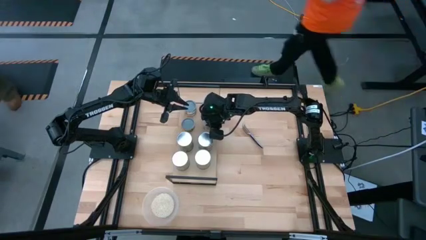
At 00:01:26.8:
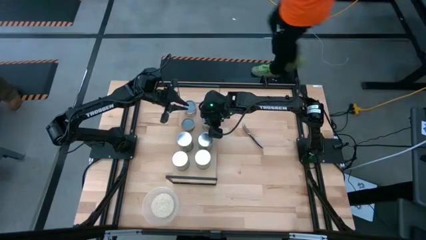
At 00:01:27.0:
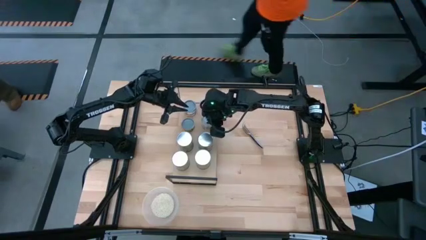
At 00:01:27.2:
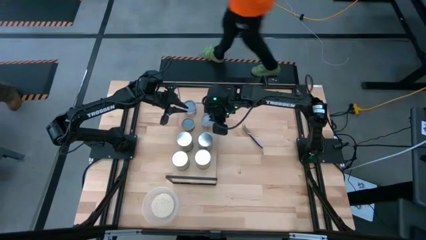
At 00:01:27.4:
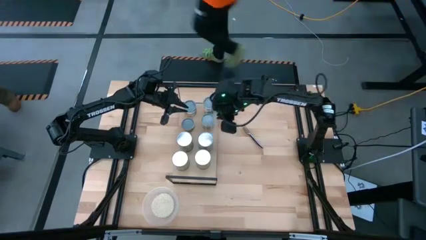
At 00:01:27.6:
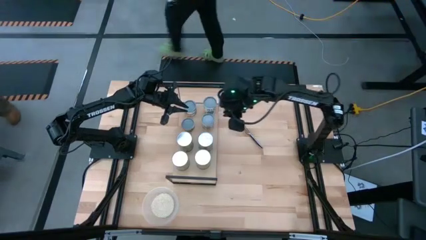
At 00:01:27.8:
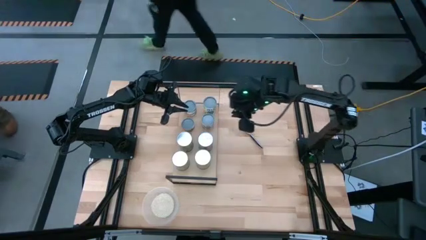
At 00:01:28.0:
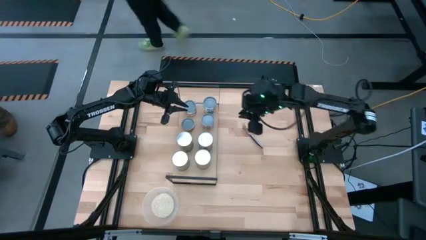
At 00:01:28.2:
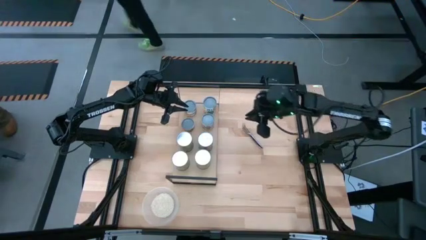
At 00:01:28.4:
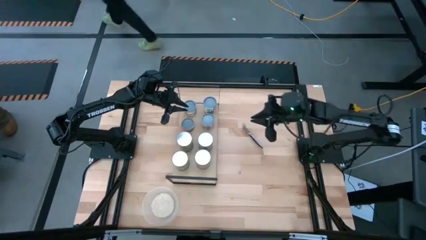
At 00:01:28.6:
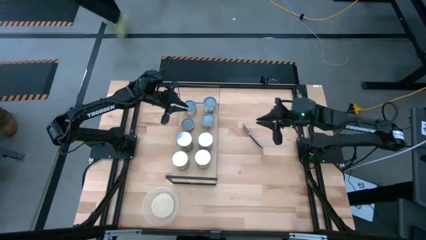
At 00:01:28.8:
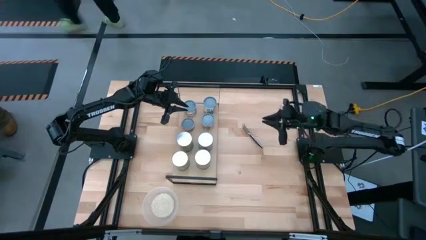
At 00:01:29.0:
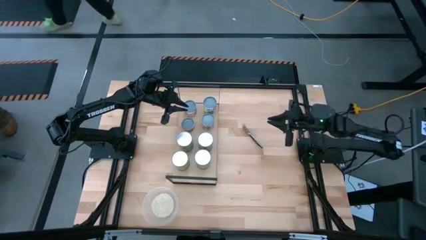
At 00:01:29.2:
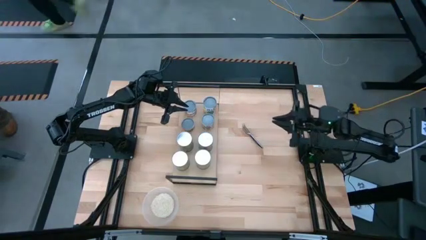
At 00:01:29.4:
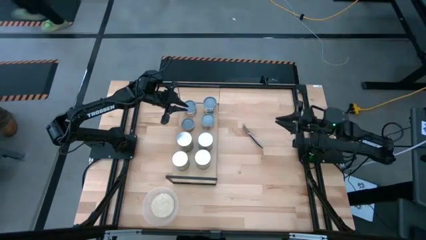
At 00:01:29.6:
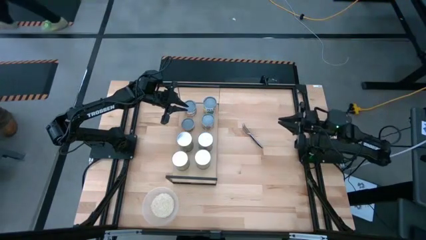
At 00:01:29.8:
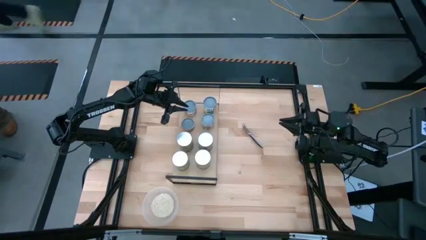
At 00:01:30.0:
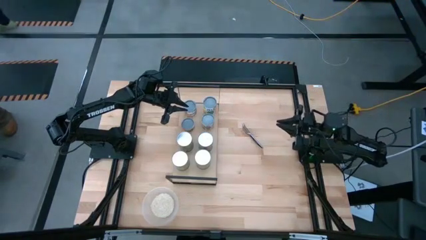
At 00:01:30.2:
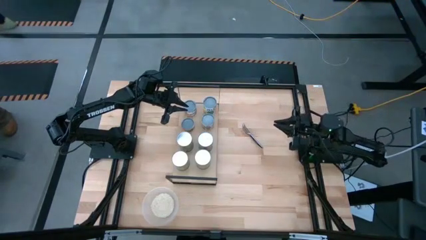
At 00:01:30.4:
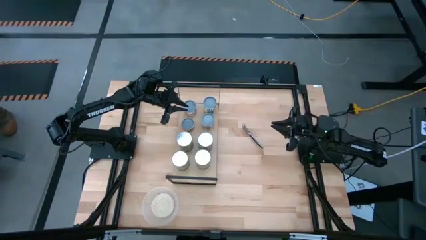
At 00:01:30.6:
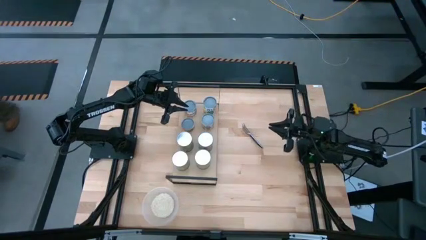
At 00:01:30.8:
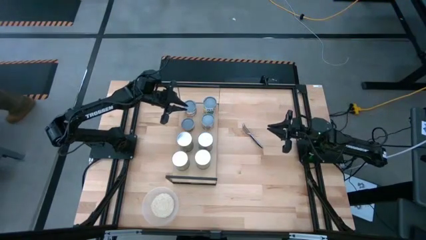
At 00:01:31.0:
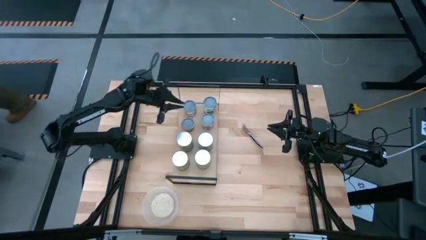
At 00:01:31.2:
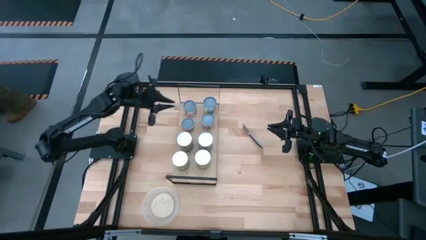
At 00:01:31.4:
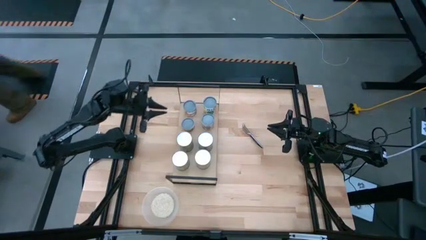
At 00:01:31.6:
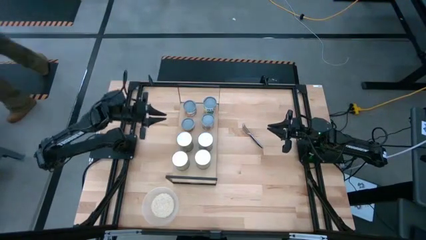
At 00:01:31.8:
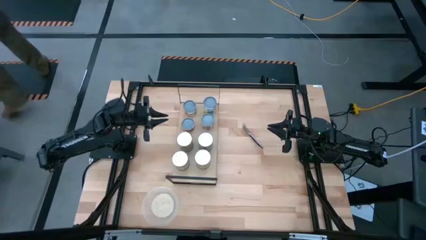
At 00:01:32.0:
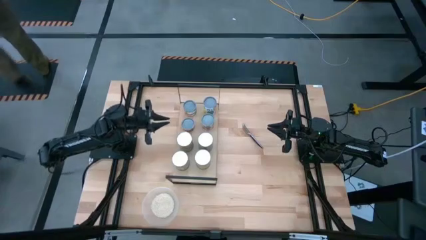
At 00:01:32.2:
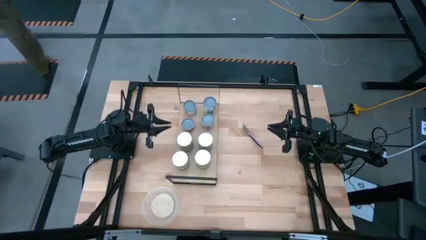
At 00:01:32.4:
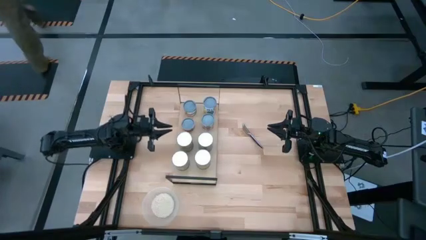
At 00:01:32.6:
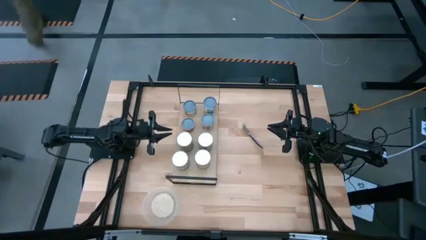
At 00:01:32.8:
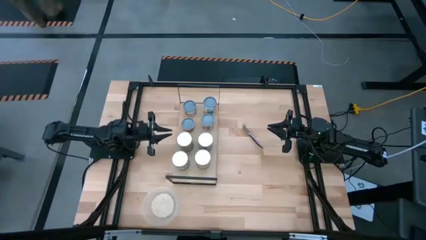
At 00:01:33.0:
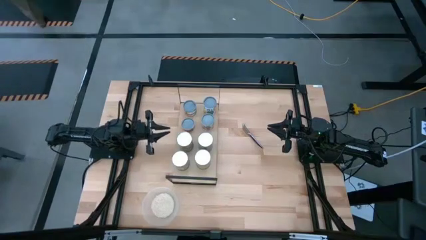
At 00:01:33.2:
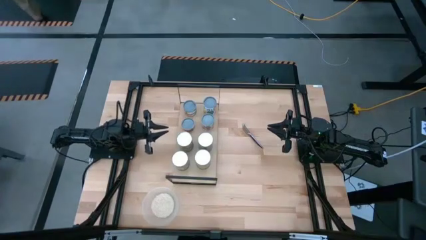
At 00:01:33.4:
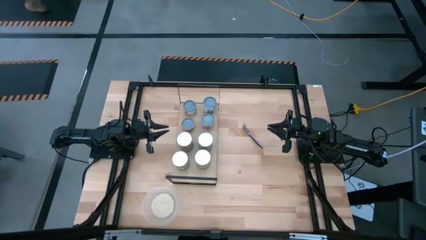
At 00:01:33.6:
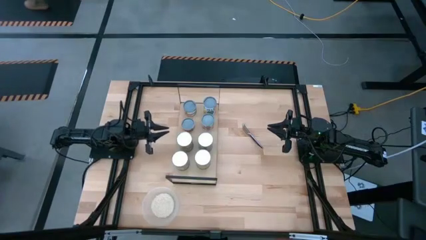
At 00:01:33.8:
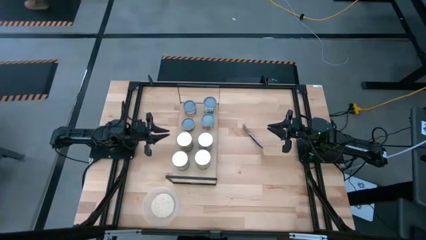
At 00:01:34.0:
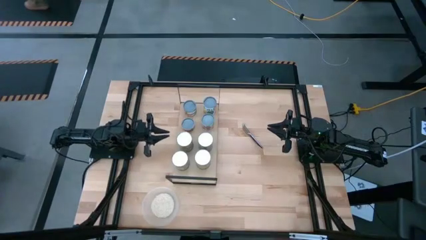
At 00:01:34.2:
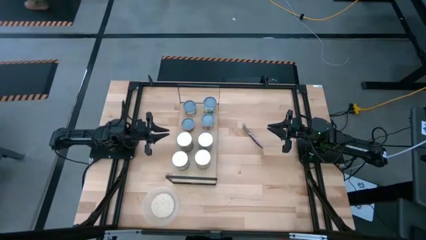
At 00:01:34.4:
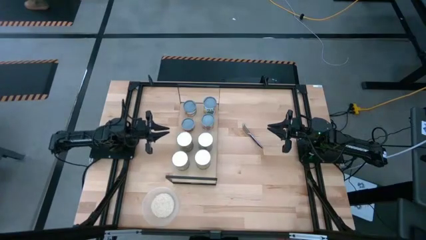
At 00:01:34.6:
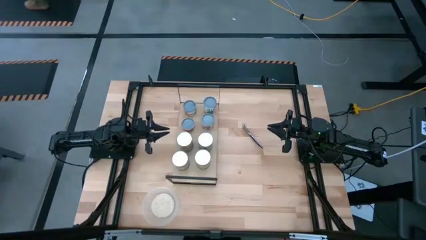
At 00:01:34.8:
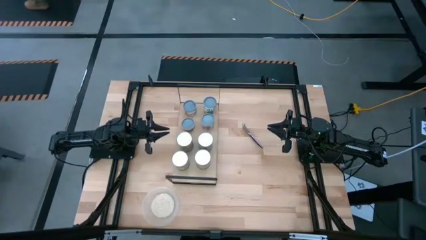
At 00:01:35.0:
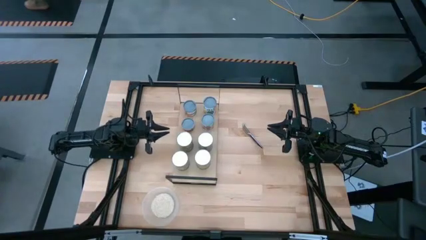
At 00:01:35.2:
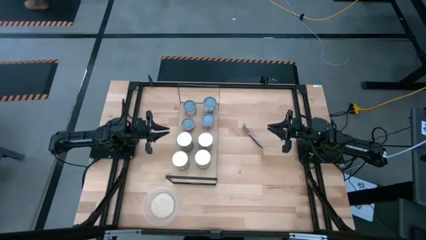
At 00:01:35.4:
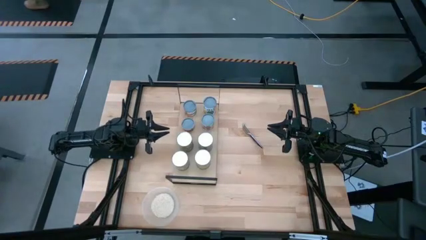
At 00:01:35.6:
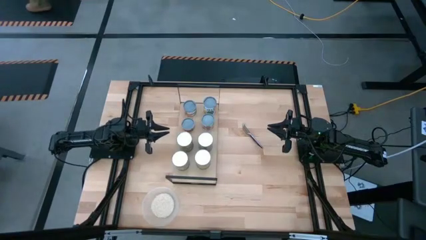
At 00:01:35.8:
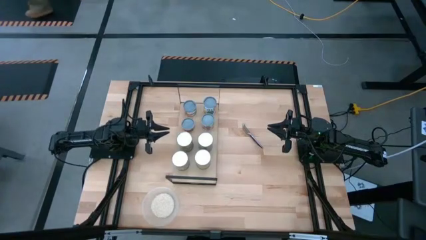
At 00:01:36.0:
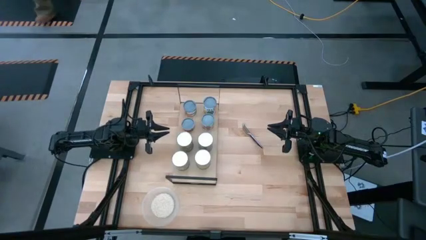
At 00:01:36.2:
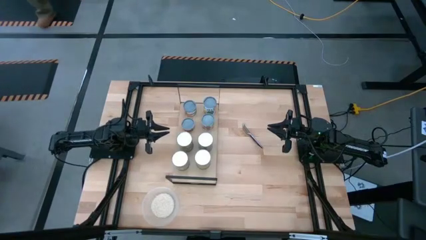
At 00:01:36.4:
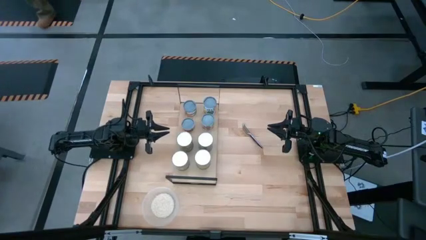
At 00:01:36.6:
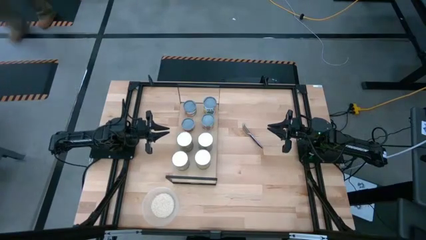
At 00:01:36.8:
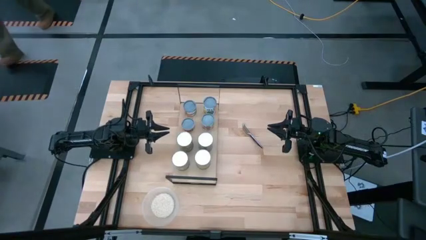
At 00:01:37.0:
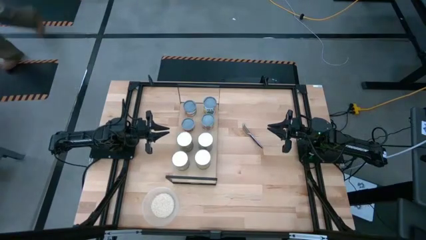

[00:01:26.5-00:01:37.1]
Task: Pick and place cans onto a shelf
Return to Home Position

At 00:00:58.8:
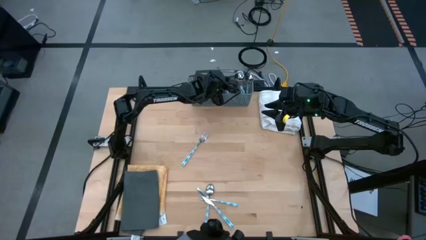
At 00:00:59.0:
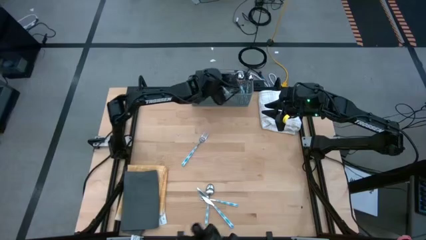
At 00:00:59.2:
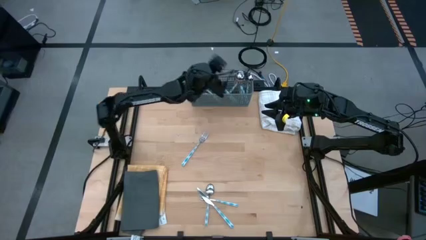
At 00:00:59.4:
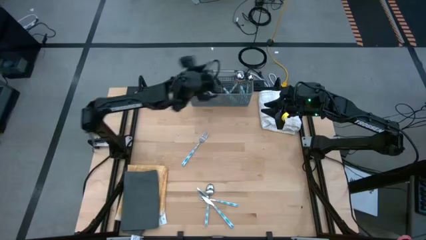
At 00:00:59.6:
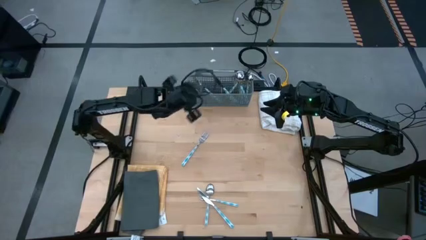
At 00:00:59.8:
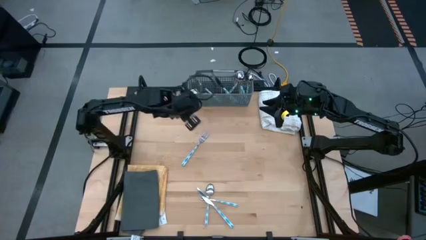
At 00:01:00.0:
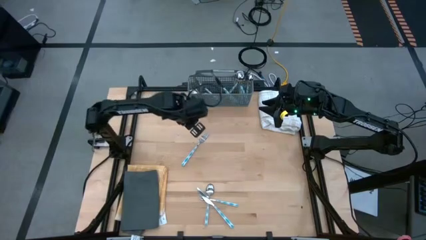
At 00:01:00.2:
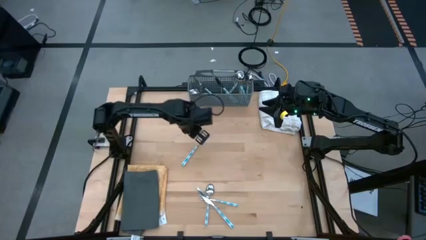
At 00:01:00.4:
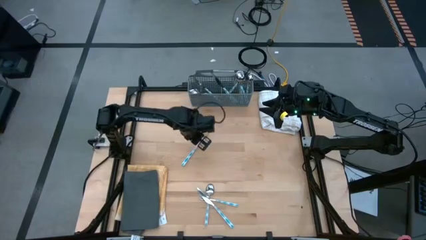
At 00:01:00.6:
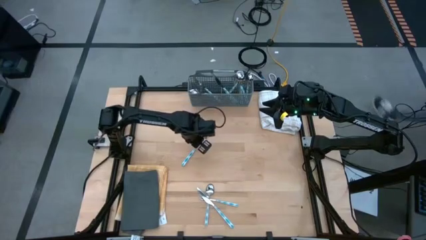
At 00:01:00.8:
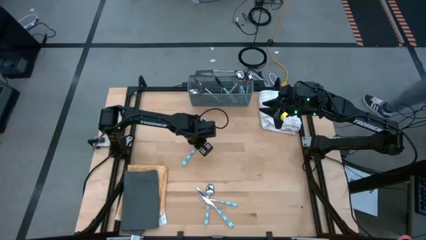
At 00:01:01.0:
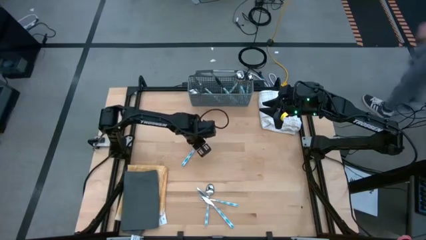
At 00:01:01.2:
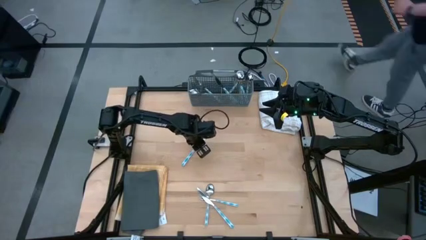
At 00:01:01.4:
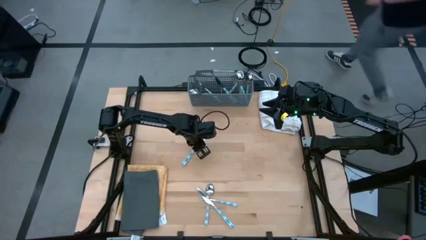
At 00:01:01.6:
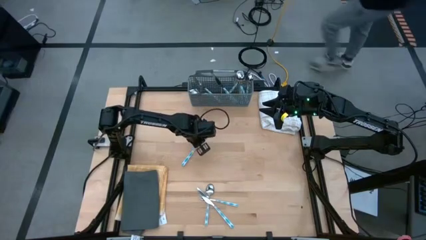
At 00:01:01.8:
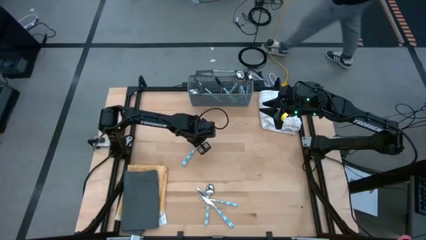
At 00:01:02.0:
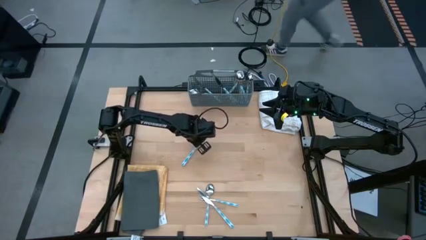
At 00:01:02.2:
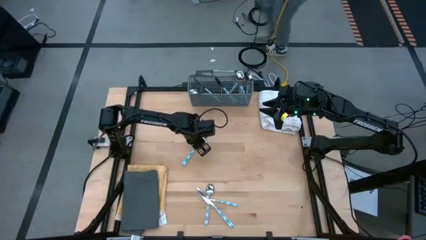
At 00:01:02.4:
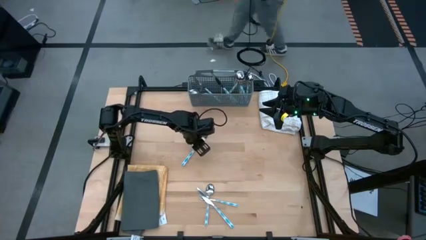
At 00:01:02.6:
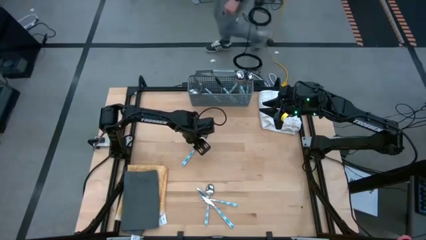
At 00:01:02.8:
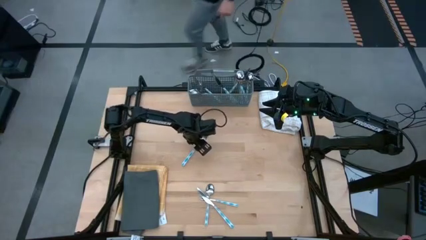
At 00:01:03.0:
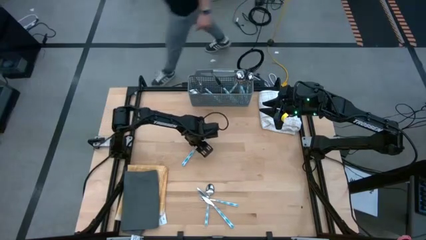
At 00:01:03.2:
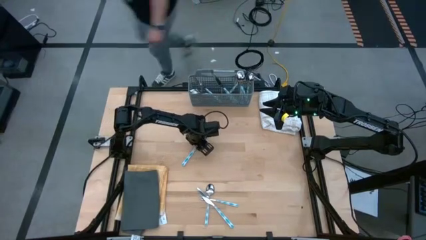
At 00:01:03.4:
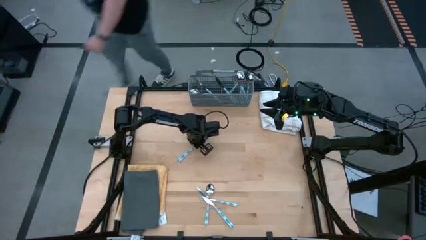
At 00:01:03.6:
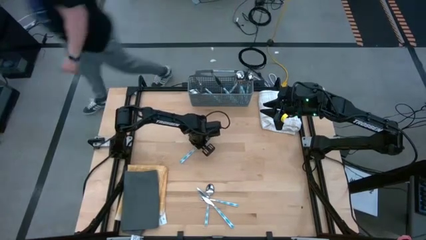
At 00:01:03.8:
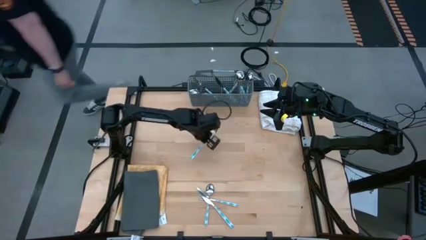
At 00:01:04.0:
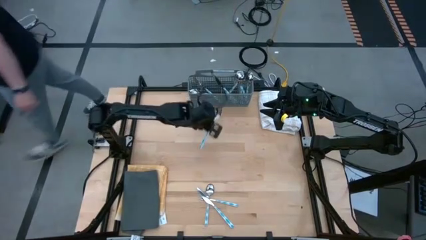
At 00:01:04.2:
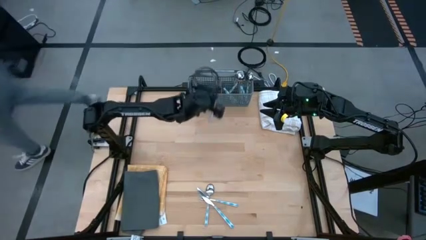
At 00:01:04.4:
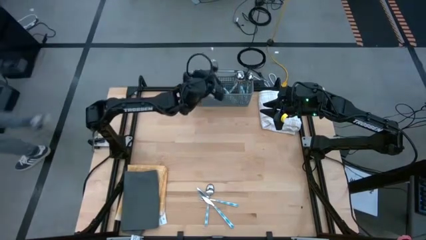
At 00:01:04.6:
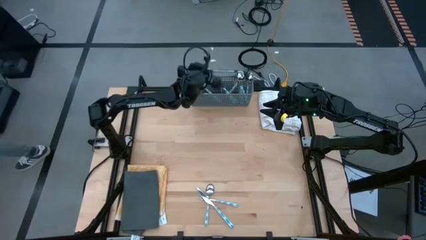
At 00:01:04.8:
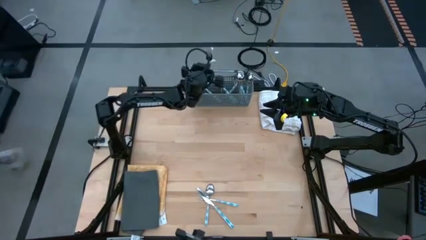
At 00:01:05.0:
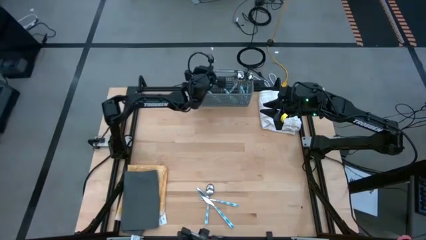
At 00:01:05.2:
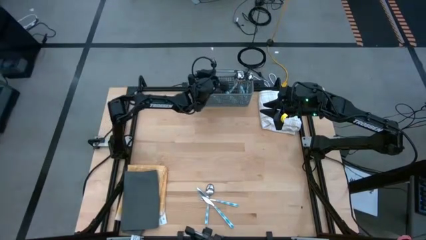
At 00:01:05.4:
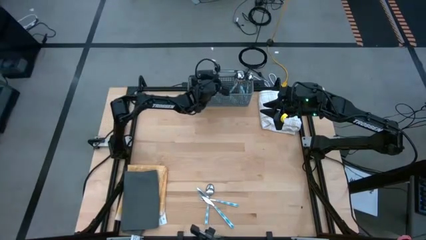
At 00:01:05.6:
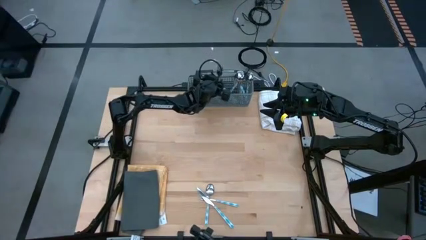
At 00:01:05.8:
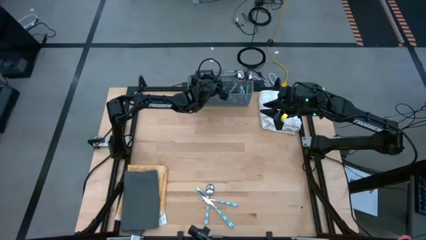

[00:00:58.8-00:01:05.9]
Task: Sort silverware
Put the top blue fork into the gray silverware rack
